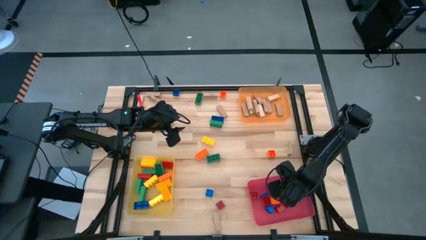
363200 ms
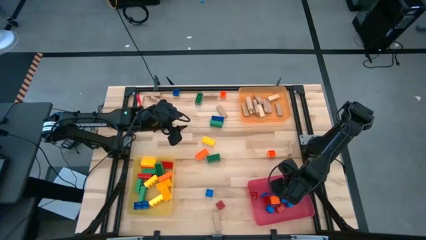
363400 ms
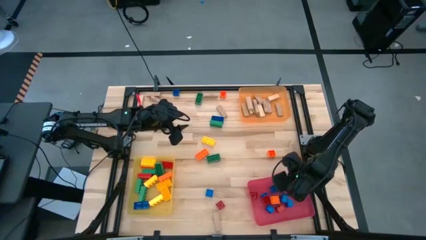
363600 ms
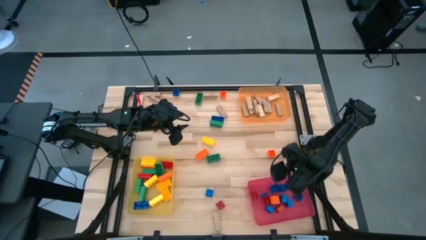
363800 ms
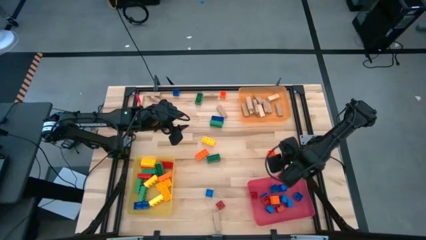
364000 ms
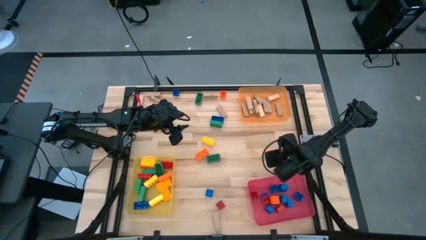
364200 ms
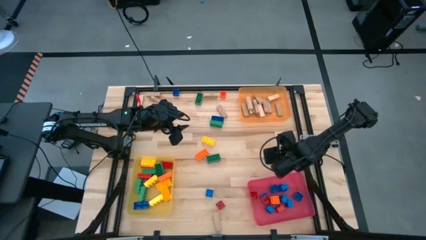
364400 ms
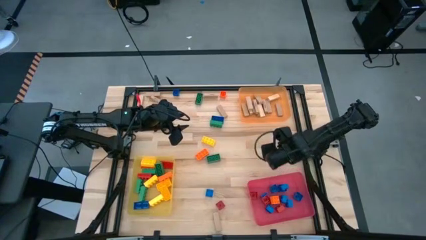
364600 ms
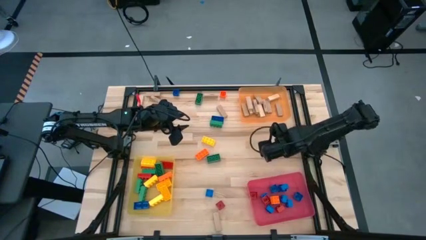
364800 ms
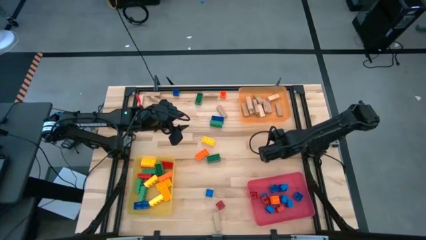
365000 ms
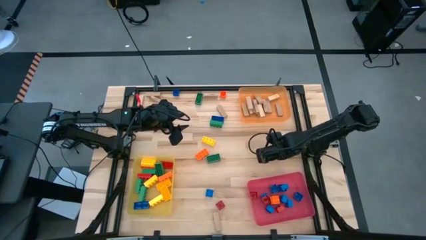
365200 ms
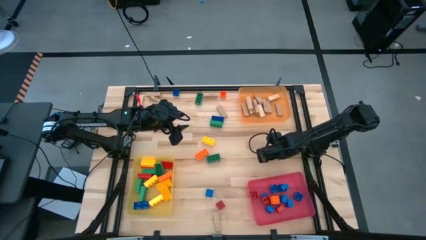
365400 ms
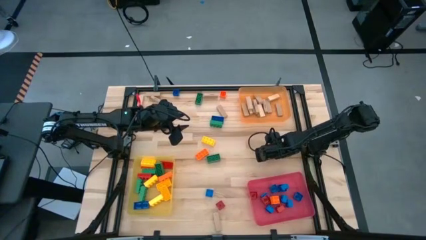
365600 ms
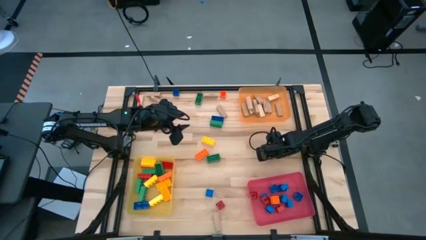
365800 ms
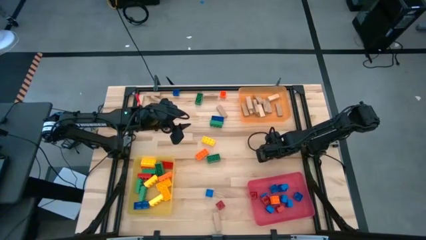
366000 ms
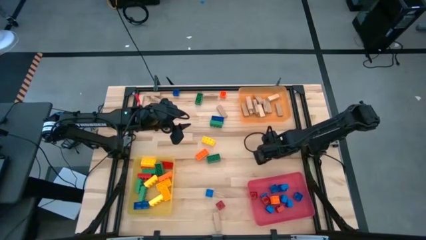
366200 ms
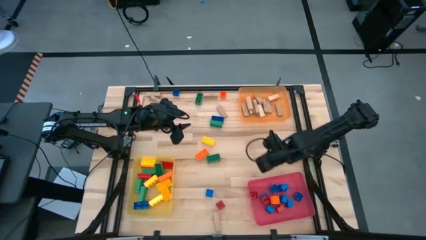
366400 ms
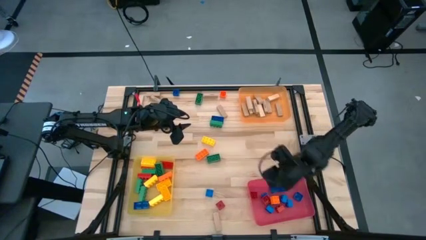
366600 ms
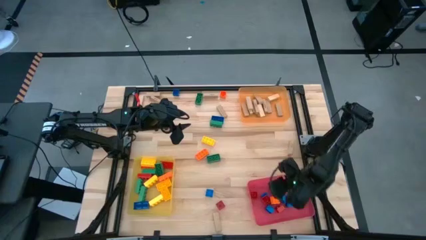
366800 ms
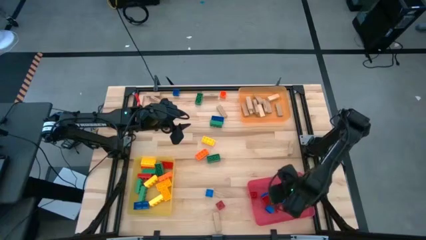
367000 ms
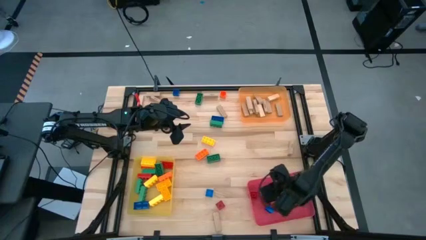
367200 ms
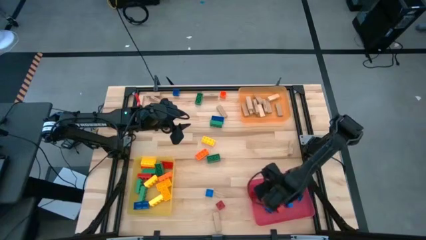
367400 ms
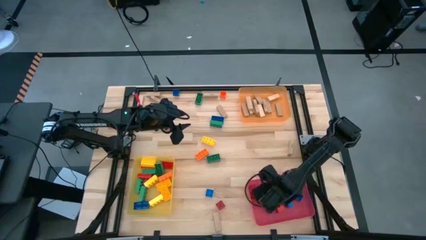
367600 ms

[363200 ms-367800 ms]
Task: Sort blocks by size
Put the small orange game piece into the red bin

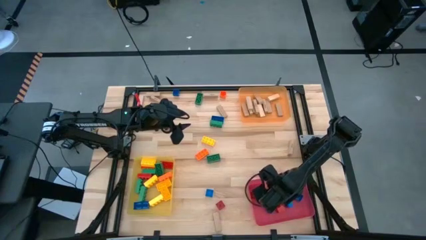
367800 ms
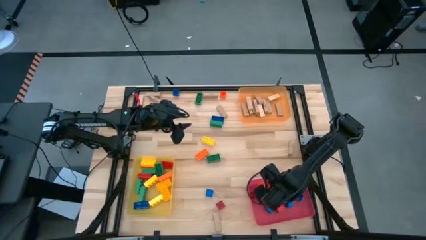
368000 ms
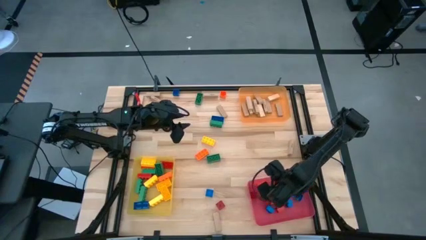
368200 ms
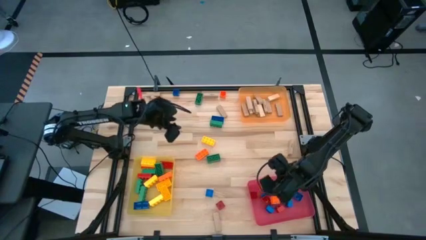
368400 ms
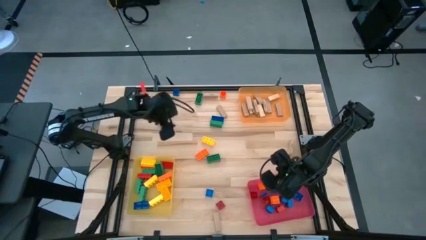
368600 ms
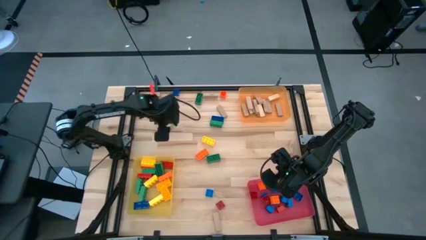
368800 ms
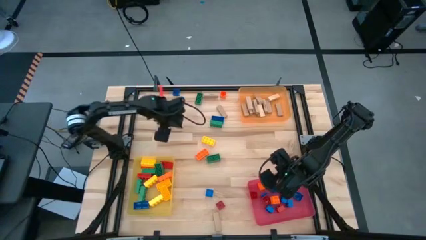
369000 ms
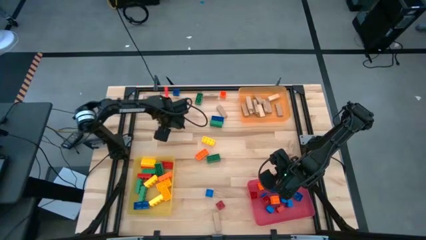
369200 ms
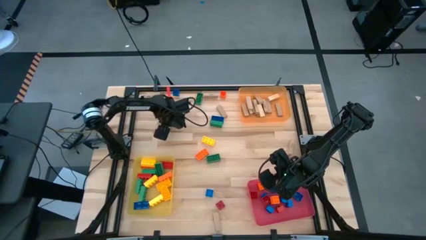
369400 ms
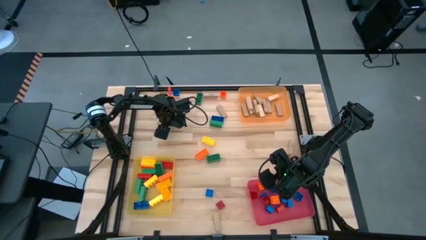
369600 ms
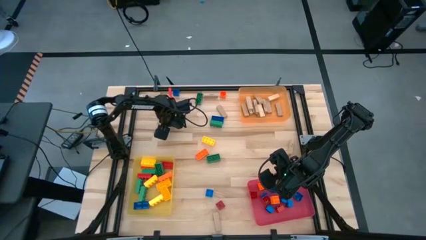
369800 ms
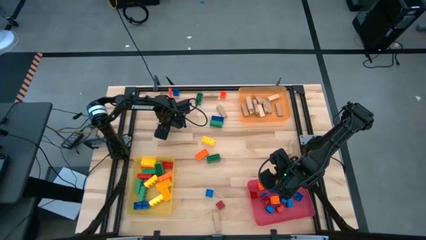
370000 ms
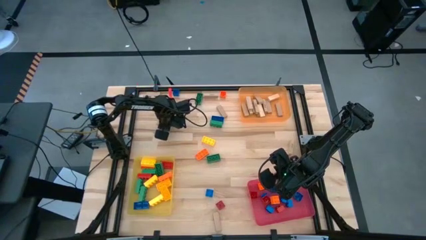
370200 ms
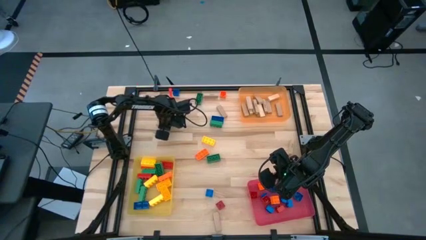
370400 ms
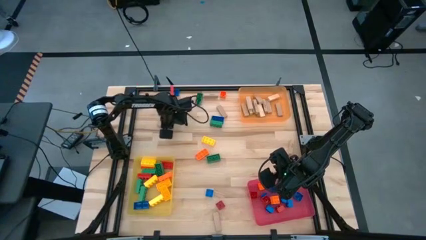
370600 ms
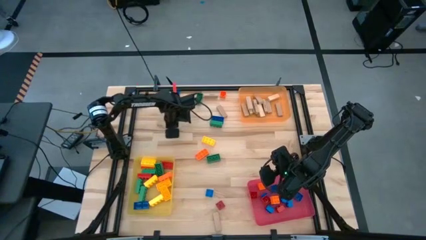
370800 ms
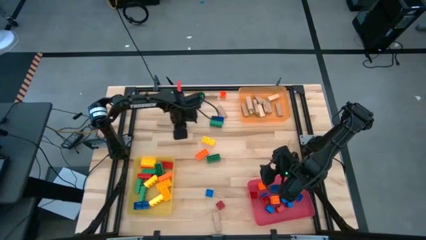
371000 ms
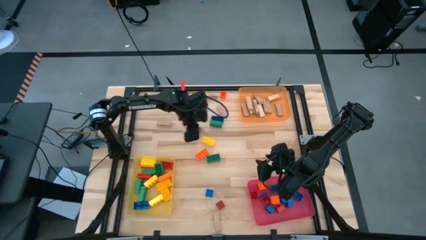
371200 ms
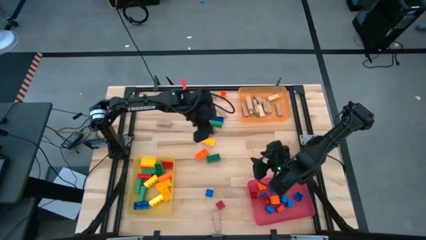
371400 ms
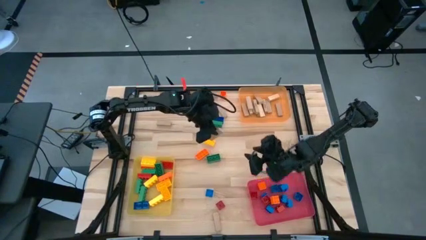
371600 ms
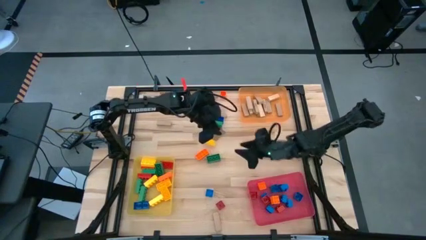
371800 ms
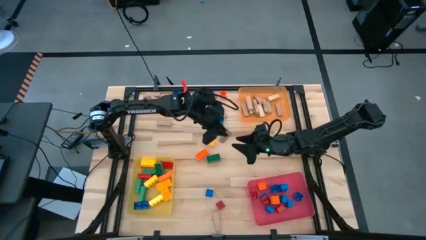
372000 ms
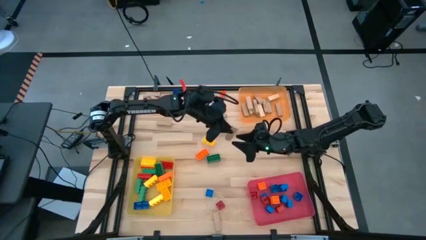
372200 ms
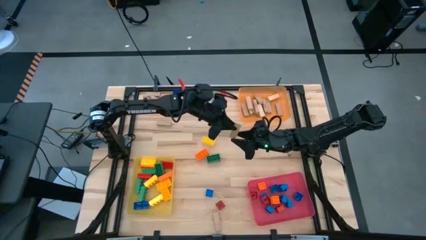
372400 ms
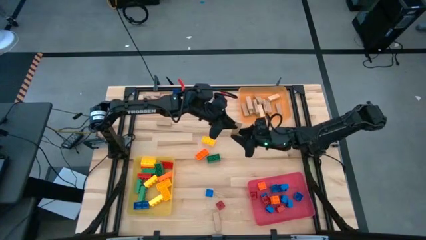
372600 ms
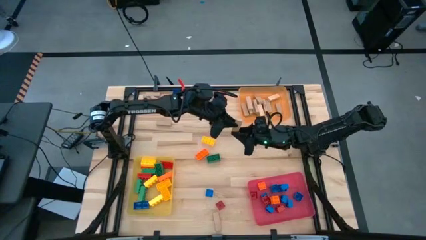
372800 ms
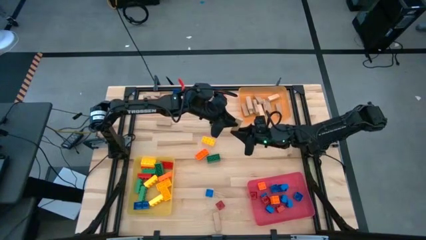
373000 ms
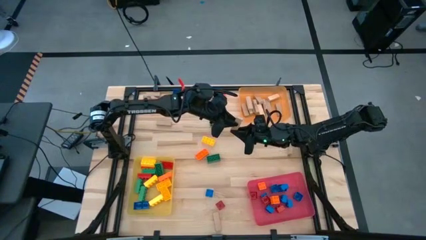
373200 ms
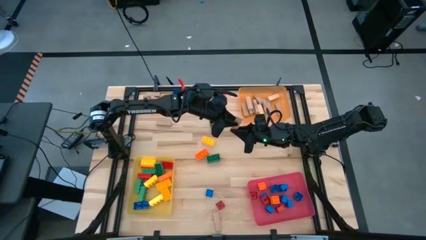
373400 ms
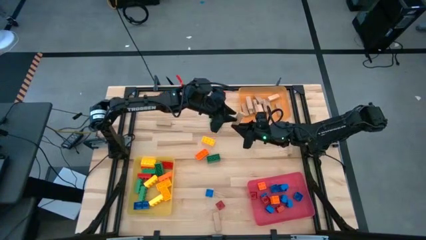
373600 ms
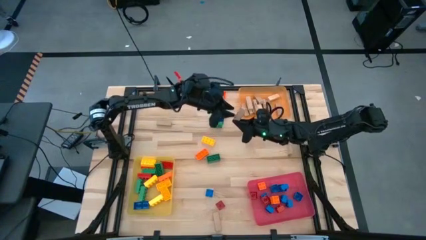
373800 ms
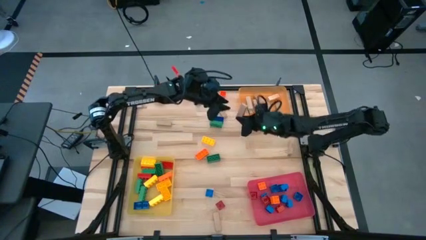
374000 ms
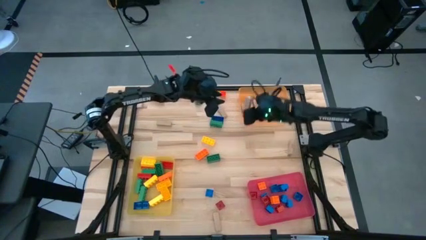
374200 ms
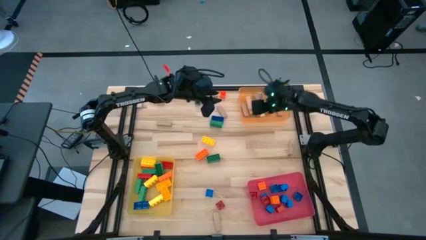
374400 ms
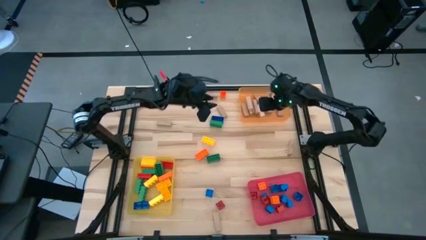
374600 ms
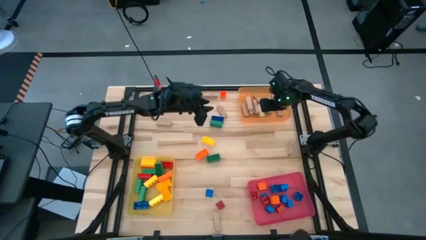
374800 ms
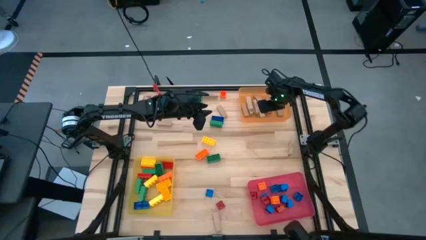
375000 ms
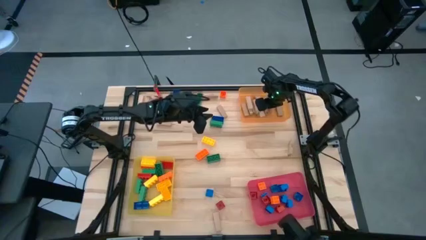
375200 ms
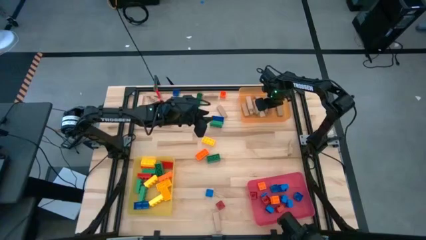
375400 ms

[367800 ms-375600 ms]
Put the brown block into the orange bin

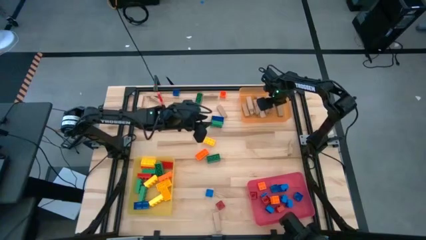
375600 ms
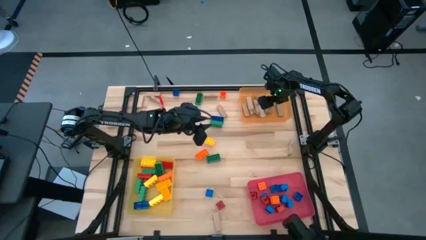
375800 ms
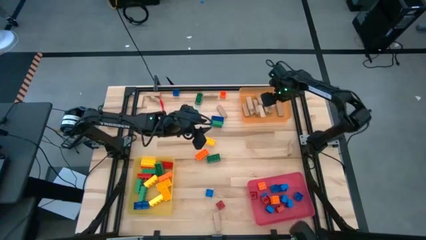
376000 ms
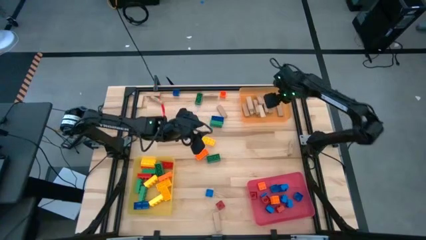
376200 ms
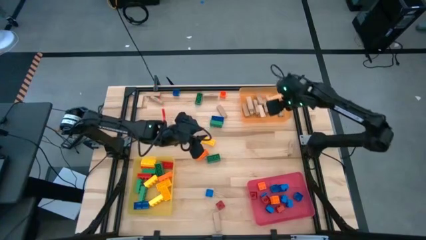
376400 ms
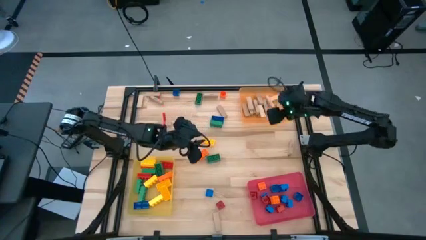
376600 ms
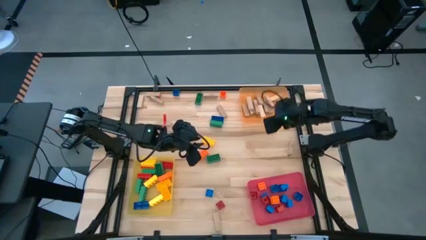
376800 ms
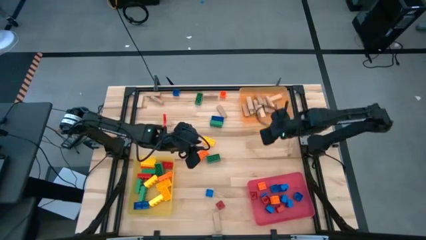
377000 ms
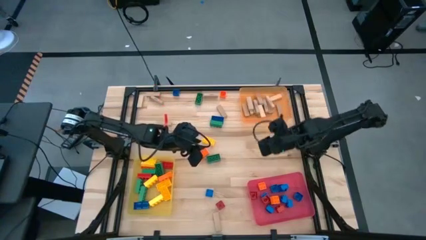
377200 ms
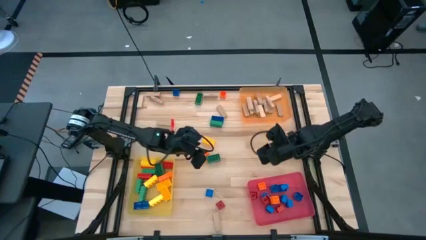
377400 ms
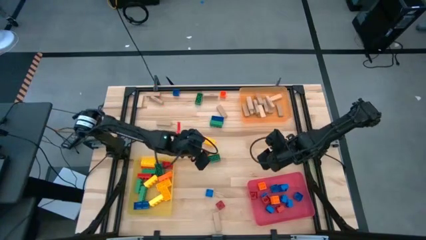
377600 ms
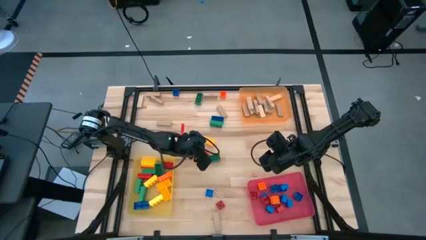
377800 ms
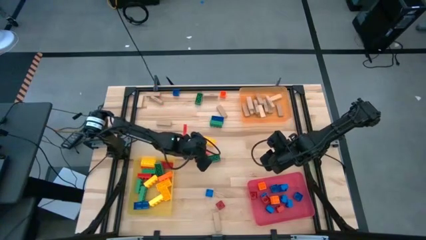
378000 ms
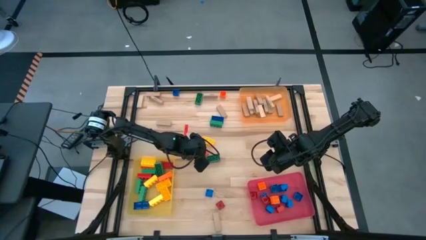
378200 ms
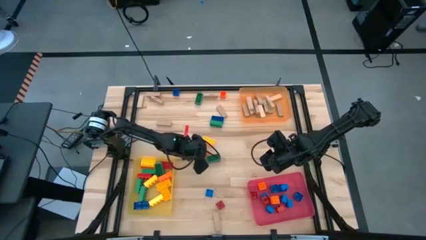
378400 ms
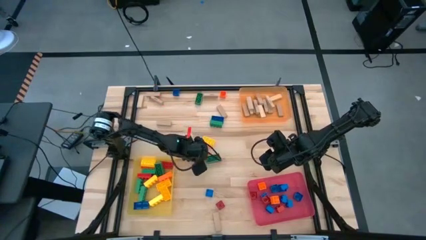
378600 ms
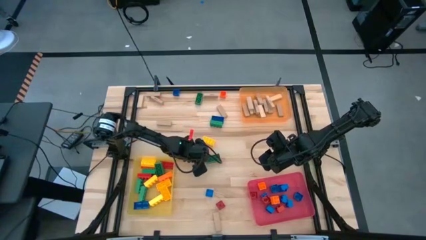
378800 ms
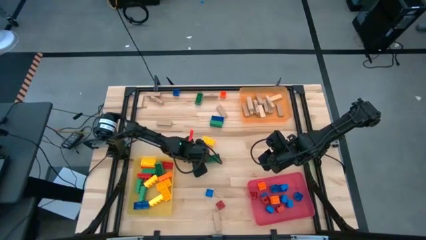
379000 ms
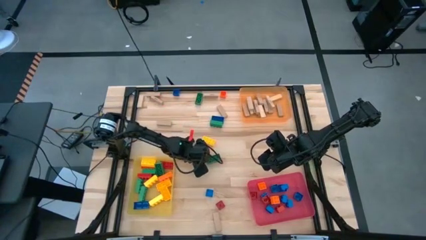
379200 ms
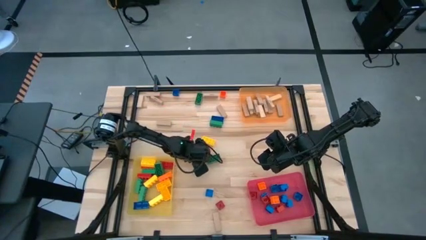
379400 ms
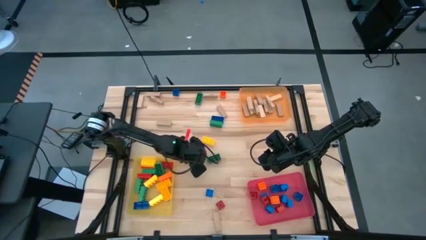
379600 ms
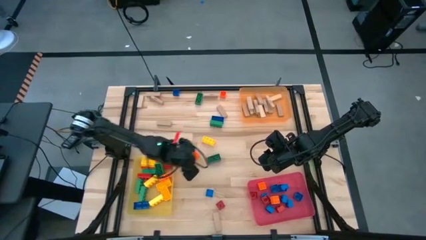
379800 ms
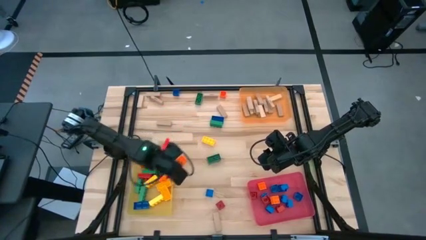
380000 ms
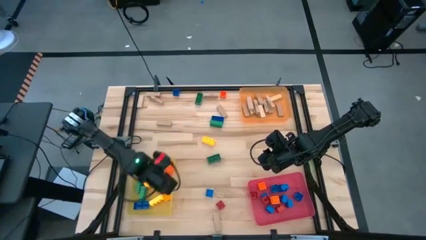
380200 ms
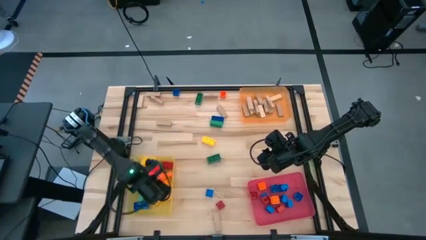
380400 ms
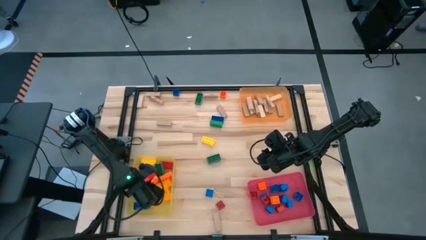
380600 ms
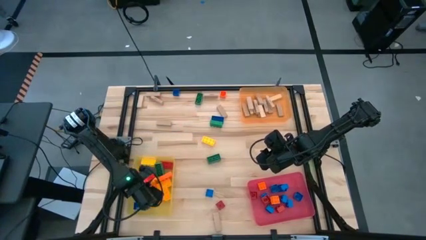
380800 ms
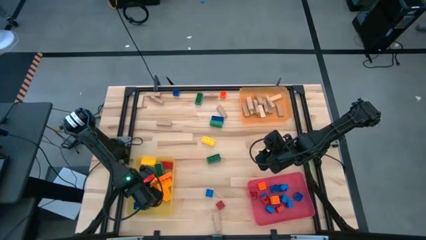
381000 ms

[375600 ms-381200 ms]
Put the large orange game piece into the yellow bin
